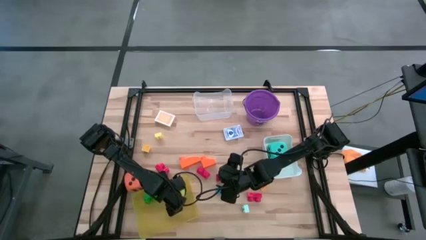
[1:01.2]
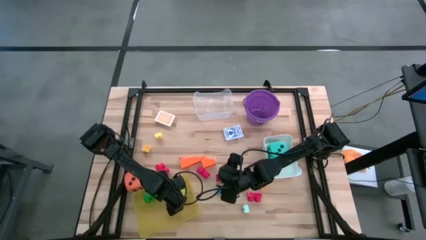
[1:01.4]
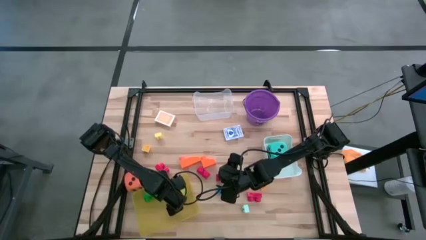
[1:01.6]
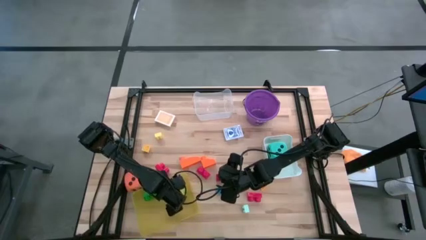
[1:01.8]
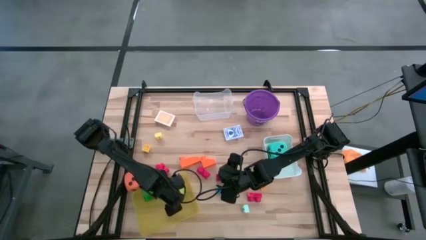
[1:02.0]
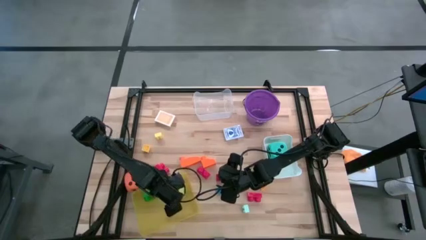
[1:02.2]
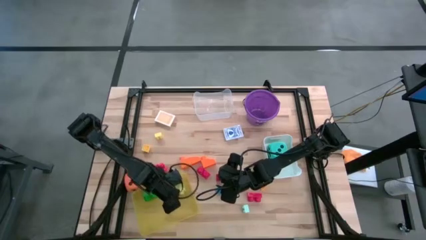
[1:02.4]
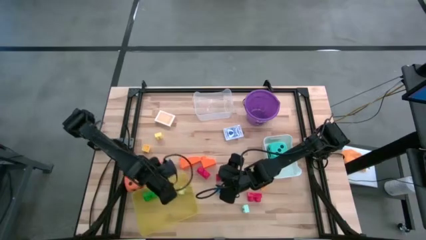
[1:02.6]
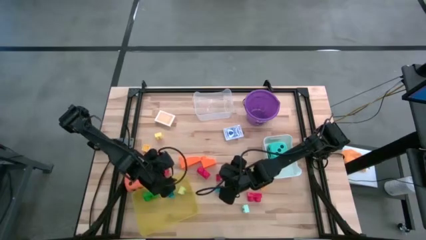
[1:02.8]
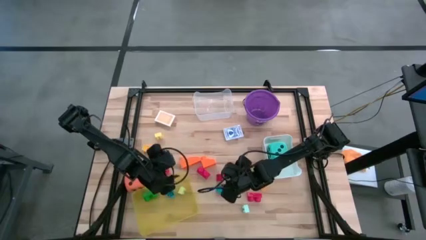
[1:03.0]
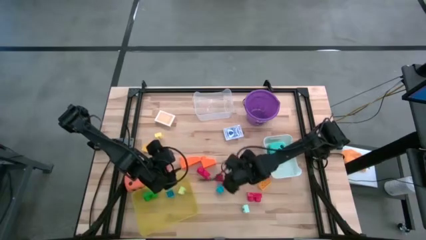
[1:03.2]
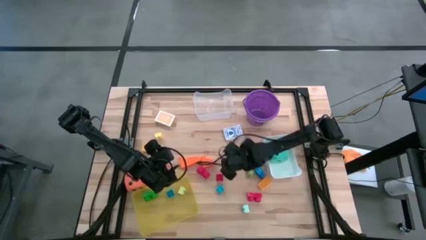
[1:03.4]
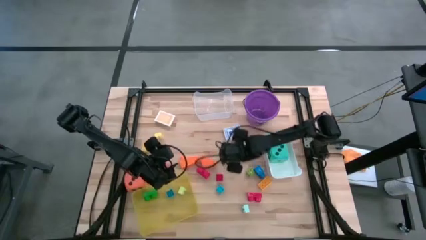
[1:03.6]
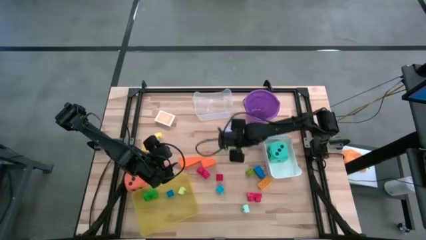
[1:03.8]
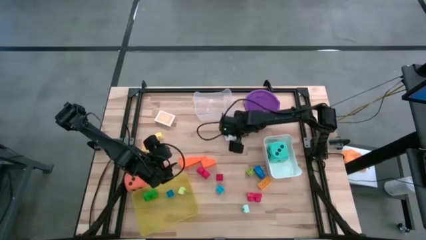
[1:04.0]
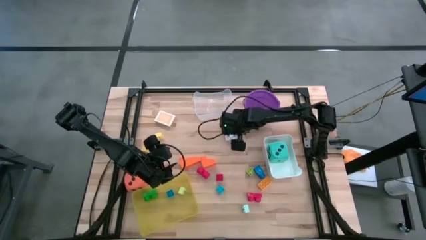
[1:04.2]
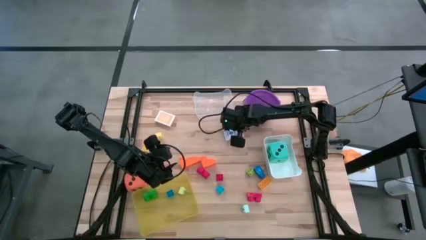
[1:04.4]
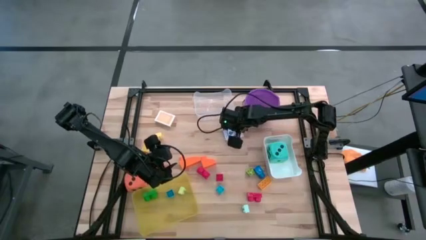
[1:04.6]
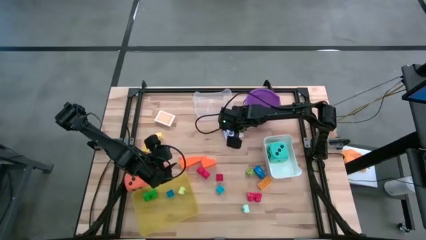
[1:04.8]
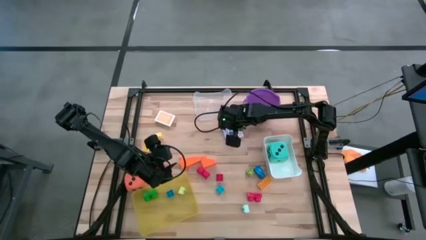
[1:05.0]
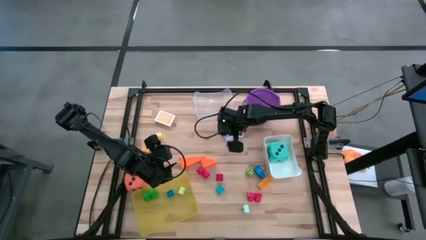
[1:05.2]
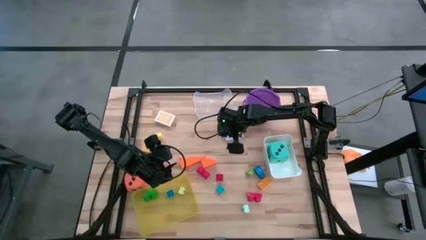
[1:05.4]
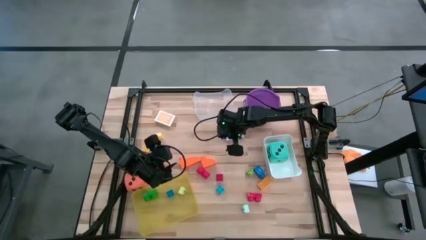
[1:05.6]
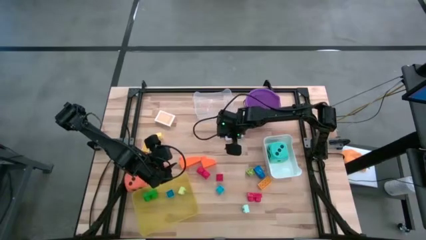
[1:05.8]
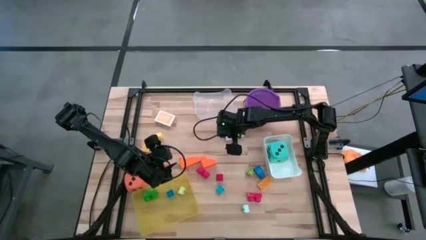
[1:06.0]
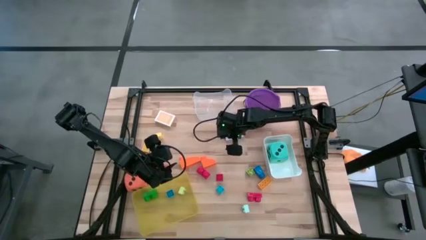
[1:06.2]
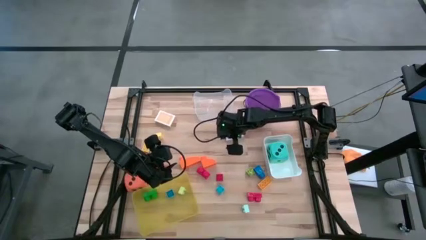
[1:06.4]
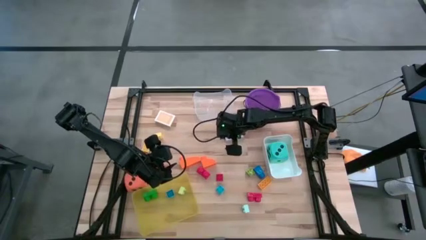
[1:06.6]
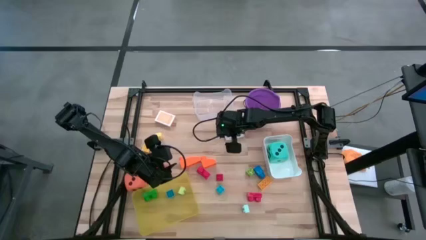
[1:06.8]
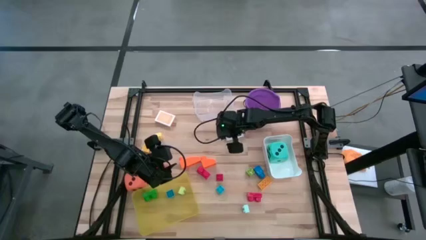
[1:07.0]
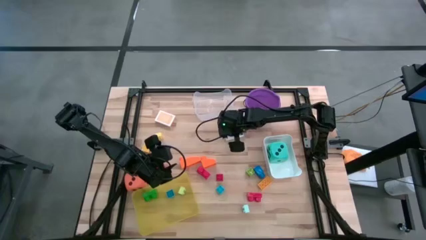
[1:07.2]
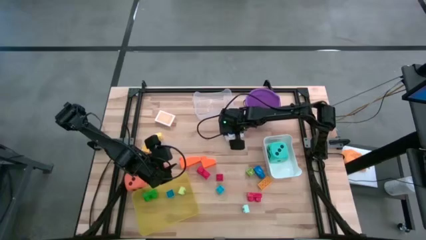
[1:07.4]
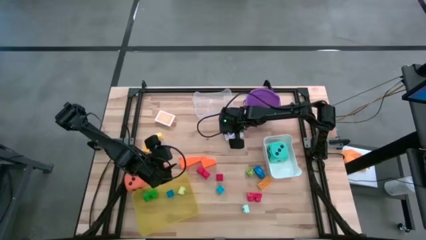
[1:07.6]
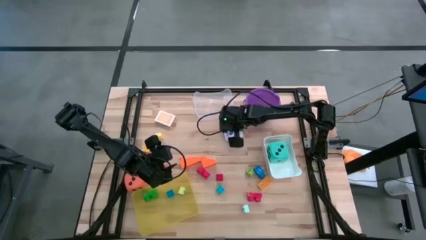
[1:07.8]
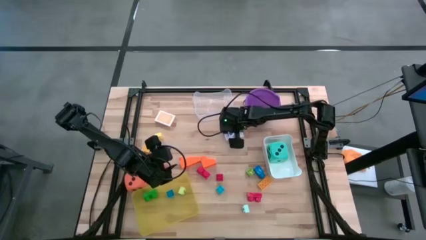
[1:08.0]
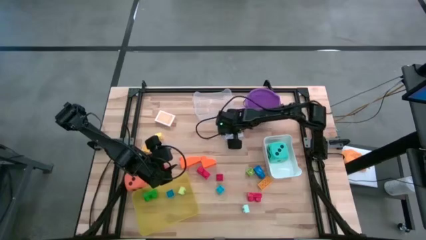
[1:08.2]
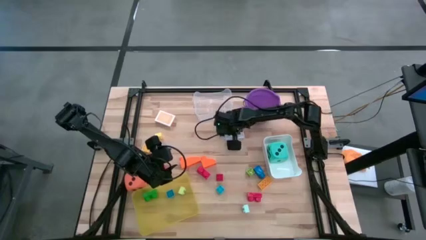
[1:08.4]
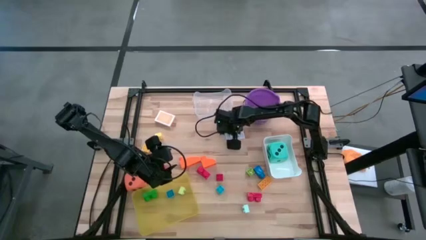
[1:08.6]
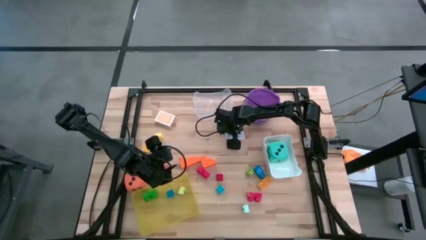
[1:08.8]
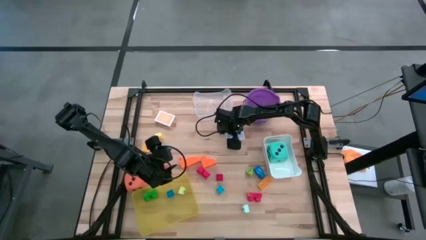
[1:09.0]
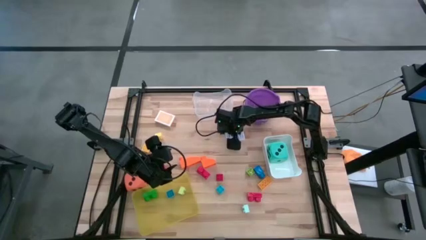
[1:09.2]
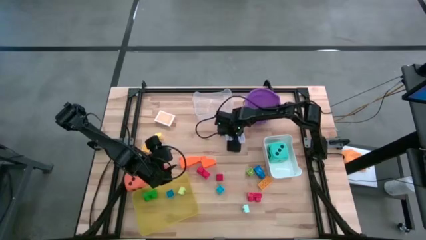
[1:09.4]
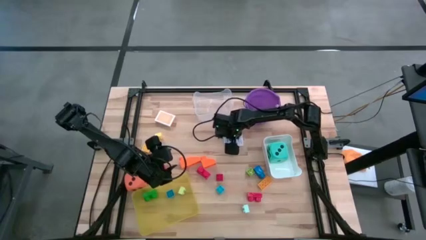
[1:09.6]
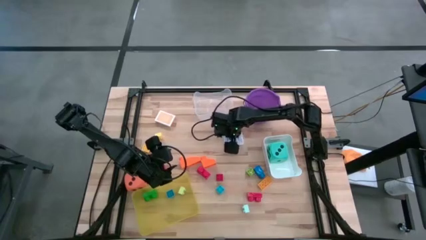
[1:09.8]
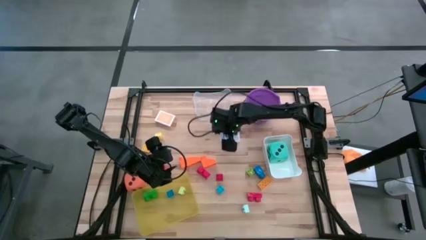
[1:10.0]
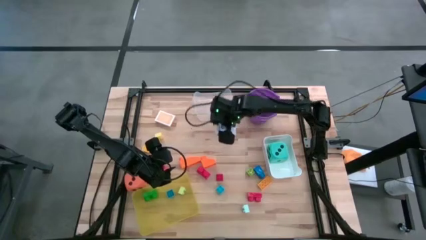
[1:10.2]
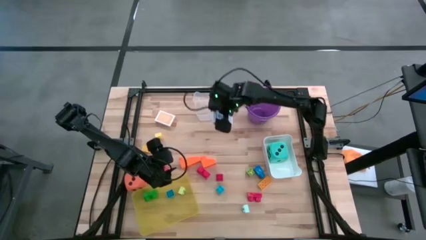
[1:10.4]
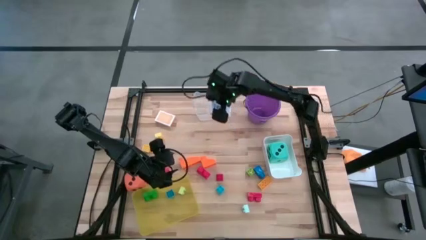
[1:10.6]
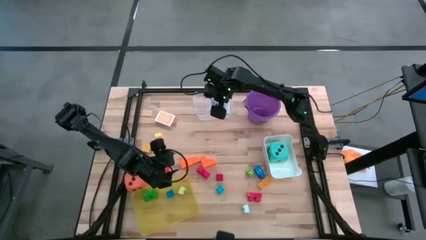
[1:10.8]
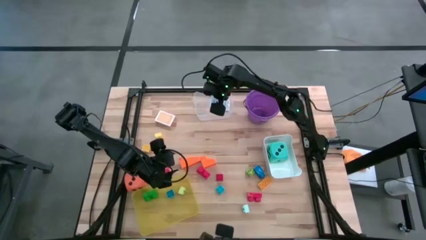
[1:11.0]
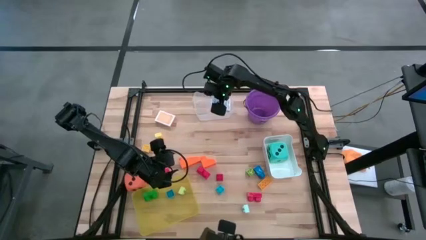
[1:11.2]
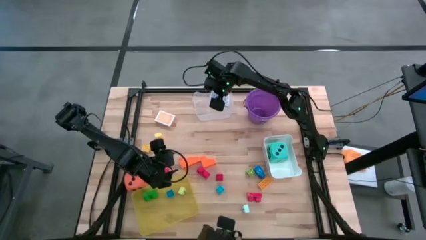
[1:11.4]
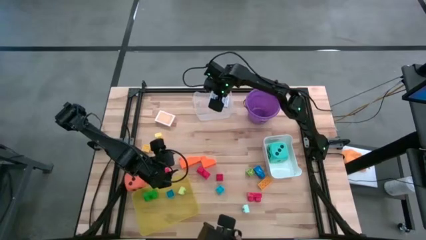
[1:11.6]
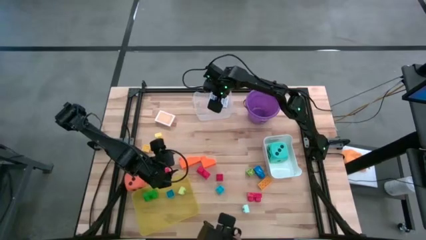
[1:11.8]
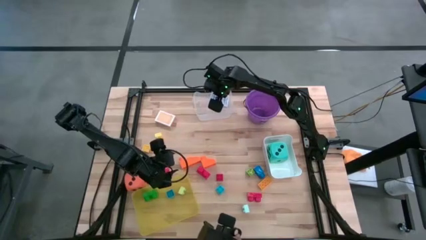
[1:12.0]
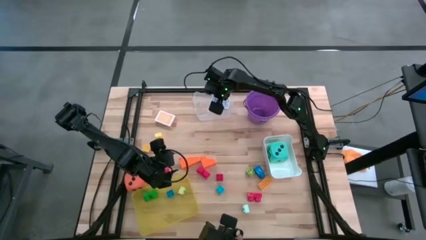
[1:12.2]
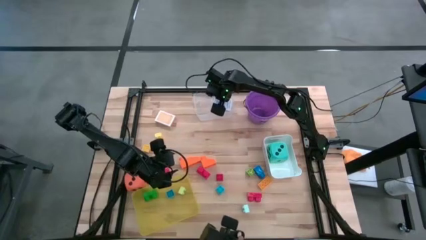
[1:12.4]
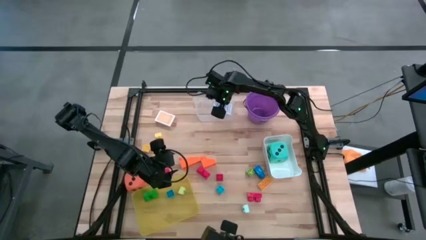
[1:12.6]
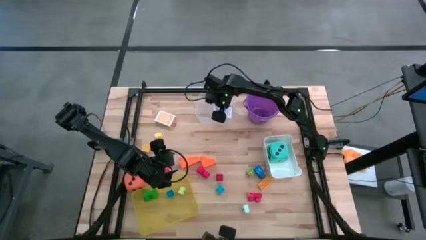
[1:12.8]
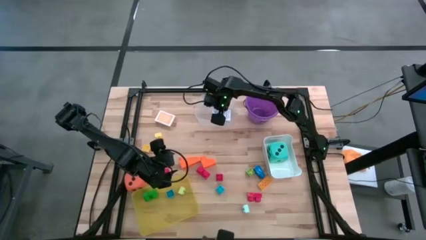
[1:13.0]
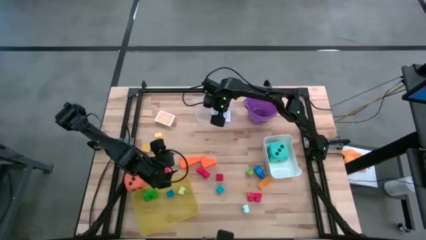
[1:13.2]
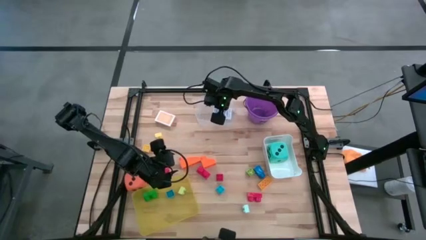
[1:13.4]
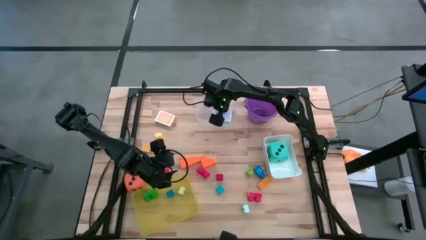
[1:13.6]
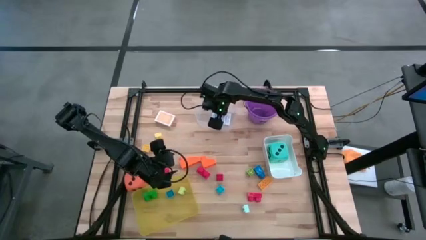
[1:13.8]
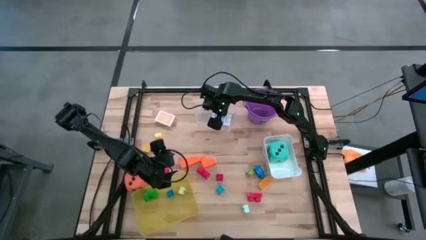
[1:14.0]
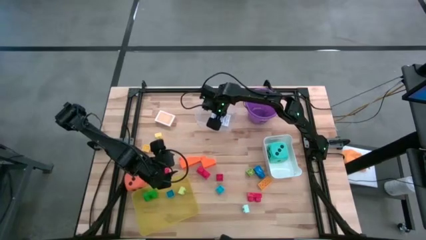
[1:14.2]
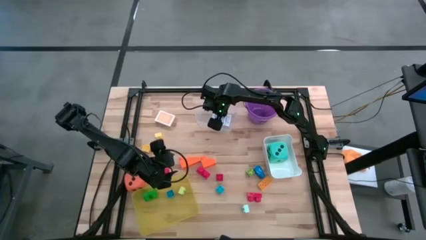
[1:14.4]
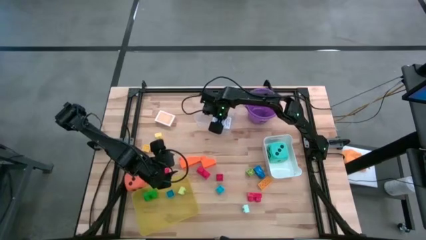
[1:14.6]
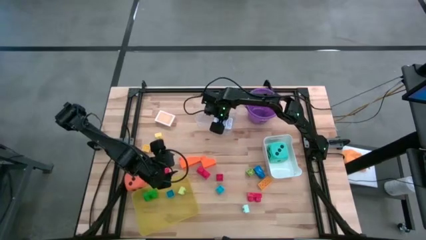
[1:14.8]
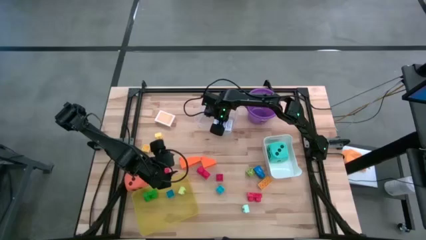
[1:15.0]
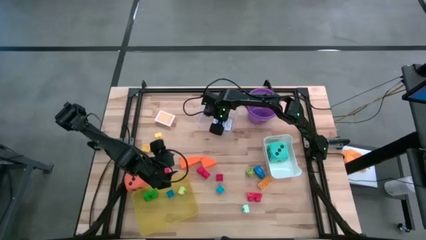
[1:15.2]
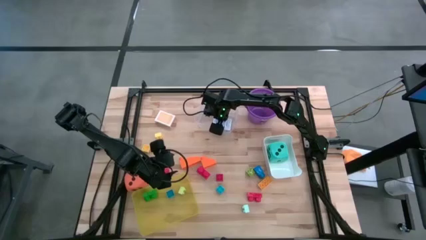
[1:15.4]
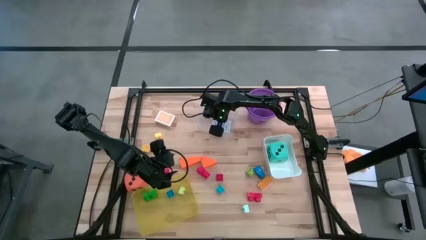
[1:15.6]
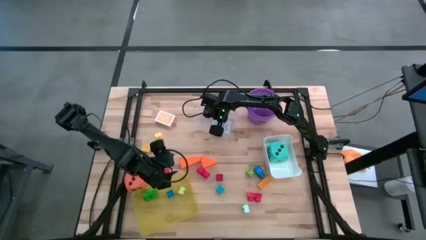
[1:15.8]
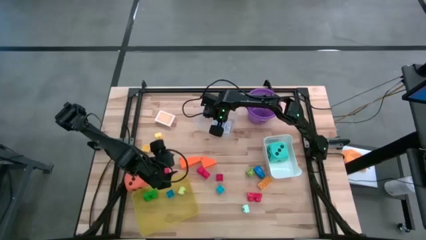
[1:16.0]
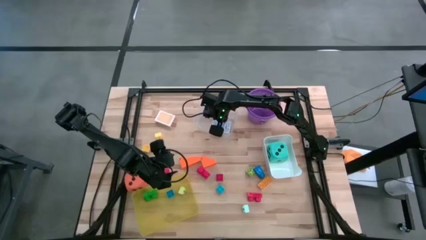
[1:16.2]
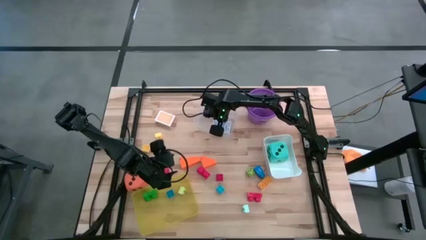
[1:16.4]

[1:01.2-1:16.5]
Task: Pick & Place Toys
Put the blue deck of cards into the transparent bin
